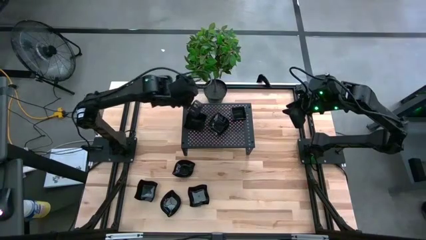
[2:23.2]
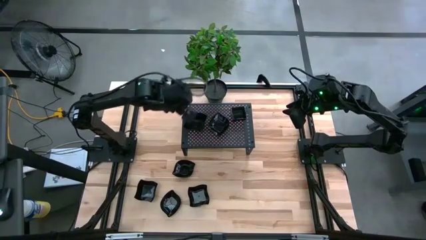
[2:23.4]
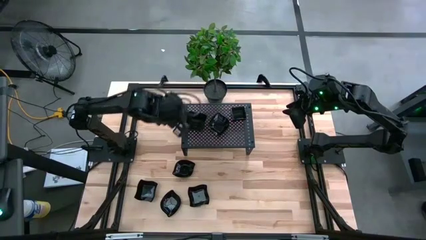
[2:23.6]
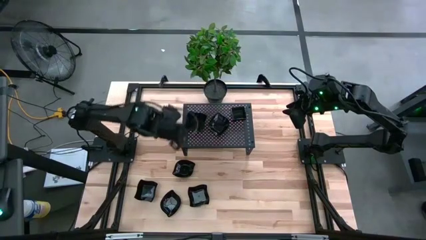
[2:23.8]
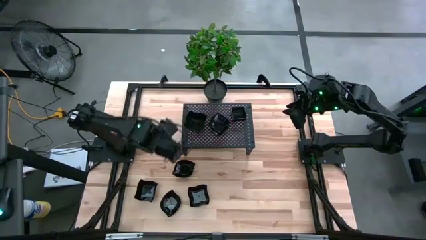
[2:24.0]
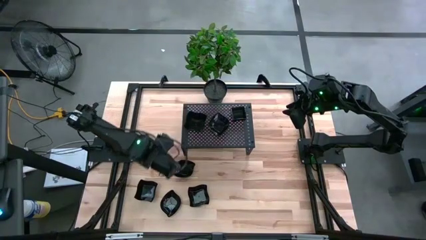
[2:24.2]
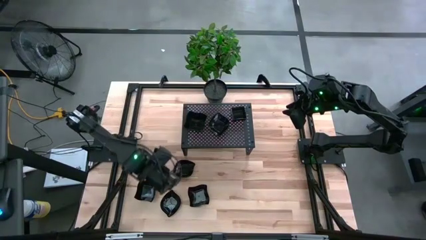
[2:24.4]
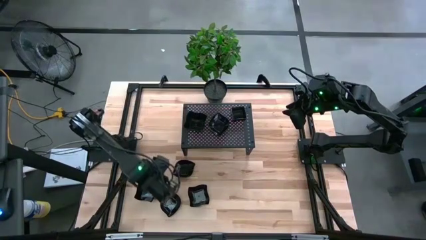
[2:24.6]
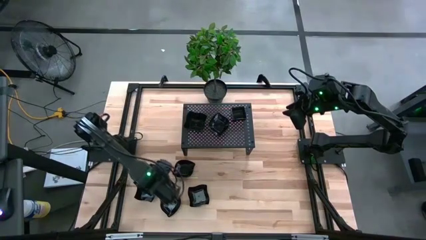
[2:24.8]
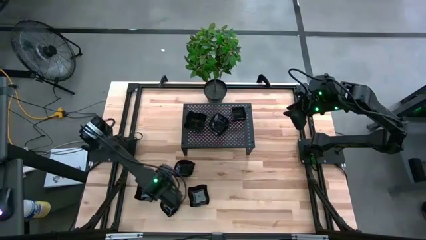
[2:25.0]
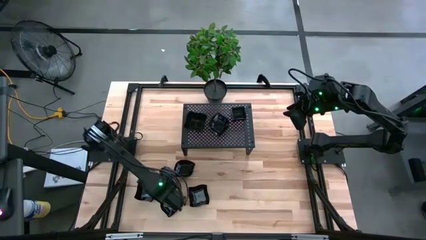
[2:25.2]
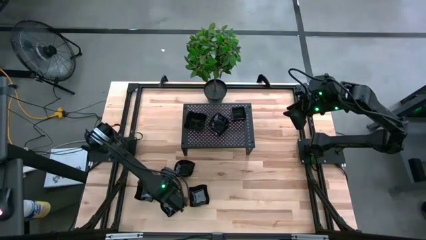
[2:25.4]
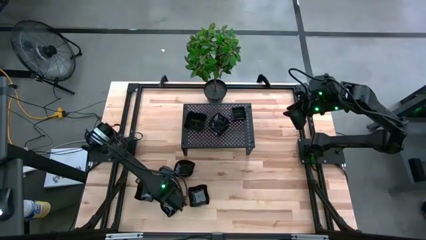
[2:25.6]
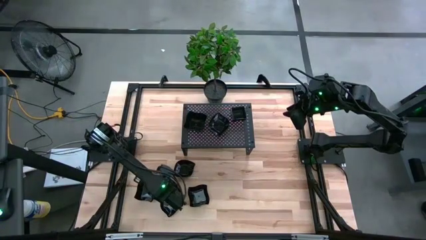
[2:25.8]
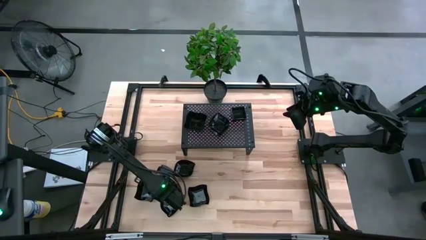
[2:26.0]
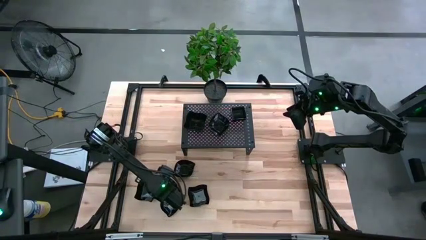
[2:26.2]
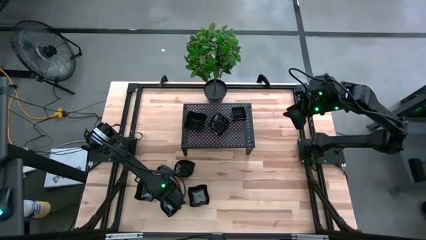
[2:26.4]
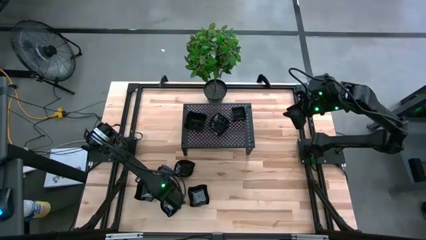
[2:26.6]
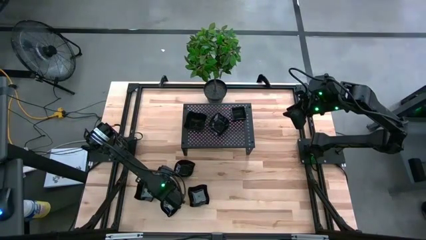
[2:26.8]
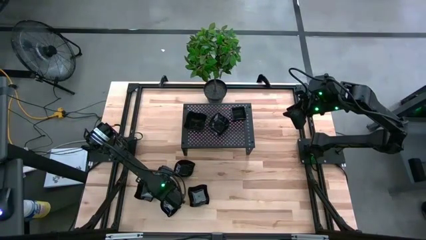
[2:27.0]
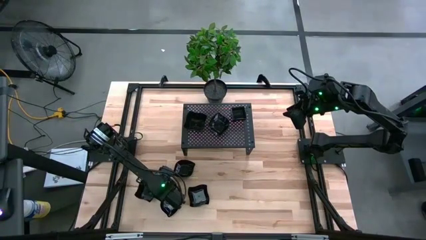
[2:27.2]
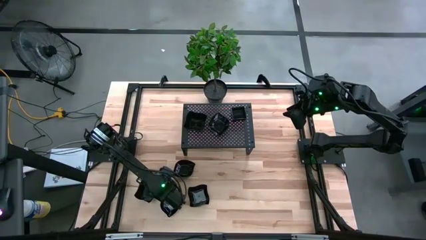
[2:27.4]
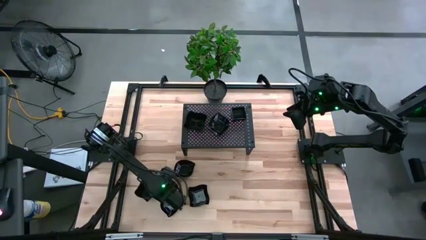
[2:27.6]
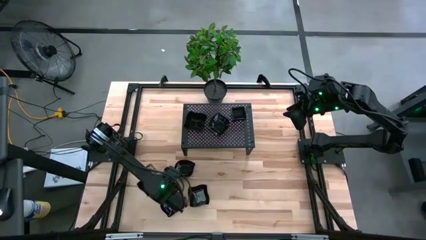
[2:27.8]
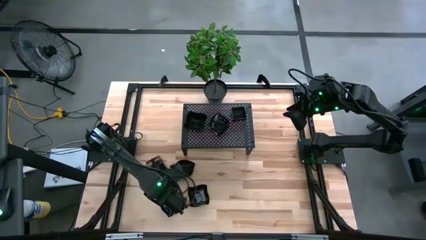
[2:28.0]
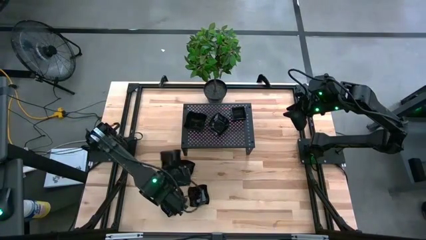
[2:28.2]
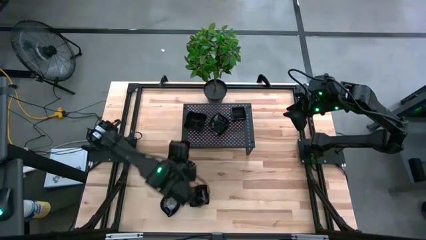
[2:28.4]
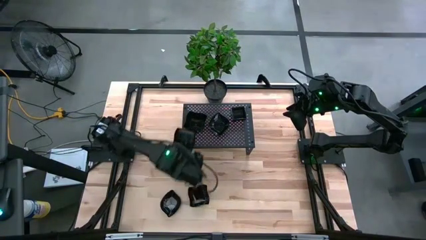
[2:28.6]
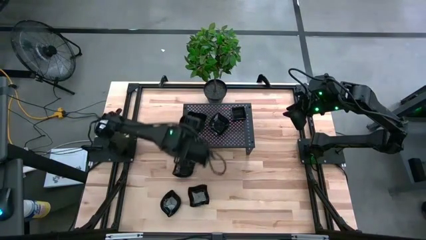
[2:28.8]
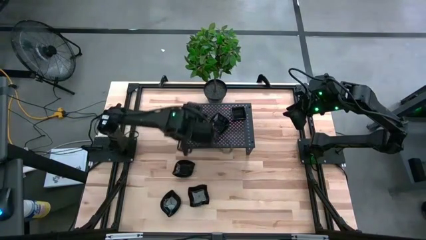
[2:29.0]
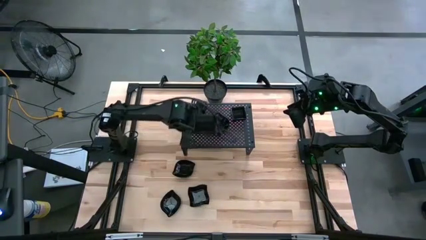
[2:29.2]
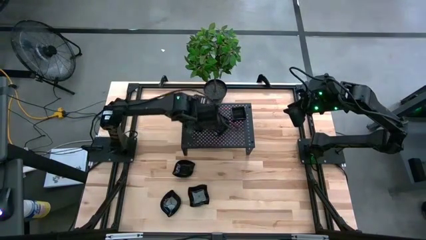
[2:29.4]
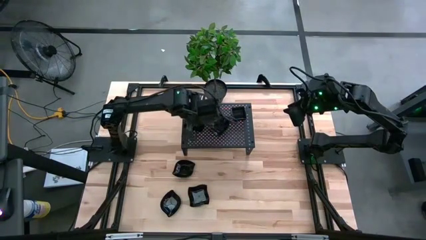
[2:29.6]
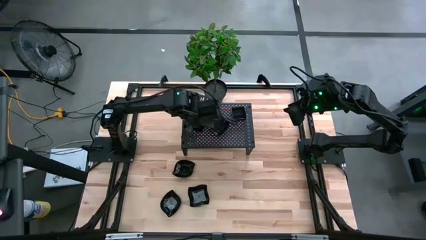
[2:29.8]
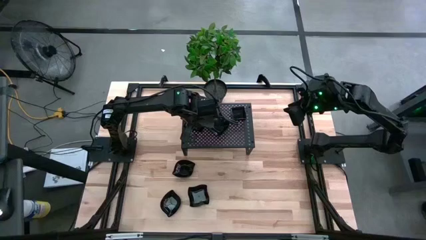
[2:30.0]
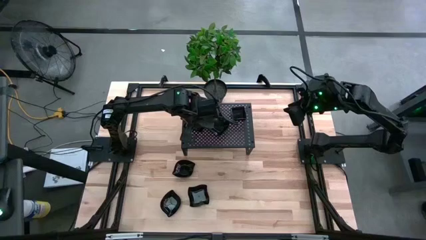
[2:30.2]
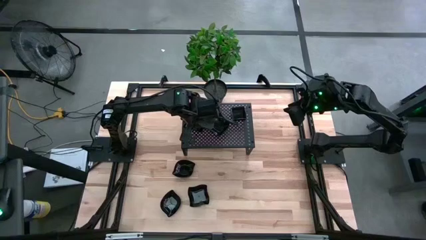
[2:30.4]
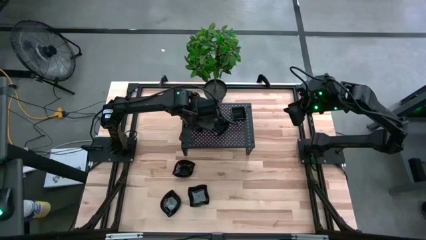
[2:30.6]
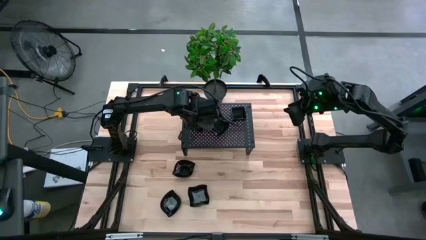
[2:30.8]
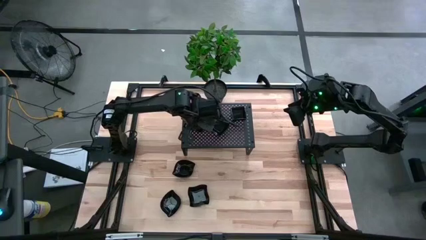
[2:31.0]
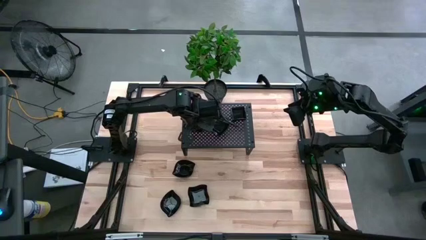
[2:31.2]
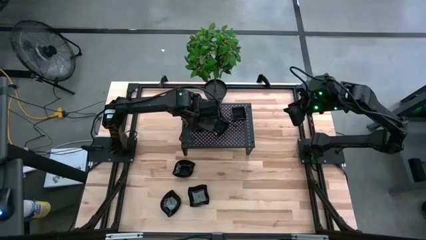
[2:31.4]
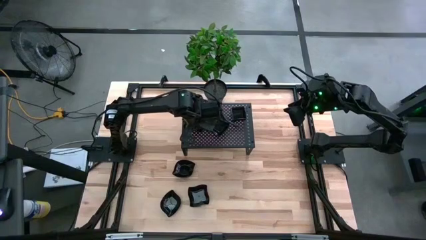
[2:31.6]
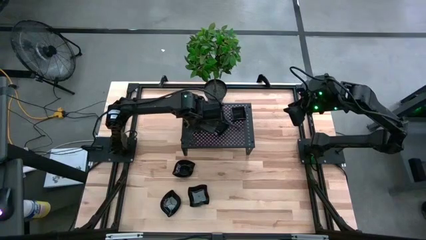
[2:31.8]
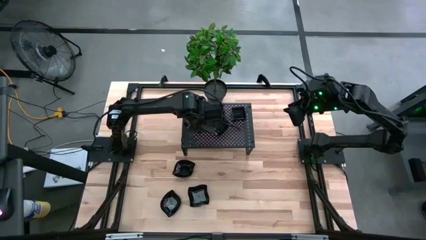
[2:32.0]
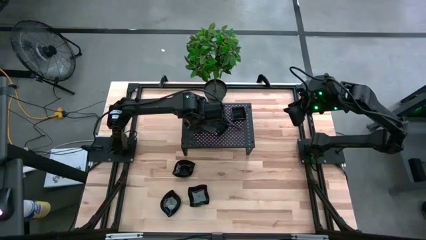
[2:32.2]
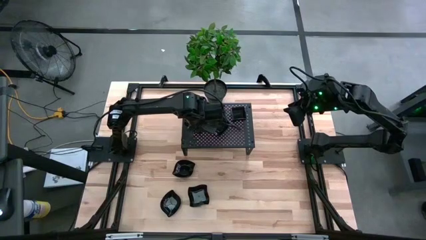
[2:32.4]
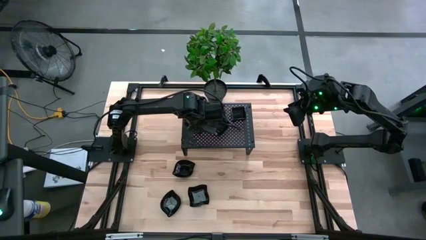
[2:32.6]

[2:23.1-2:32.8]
Task: Pick & Place Mini shaped plates
Stack the black distorted square plate on top of the other black distorted square plates on the shelf

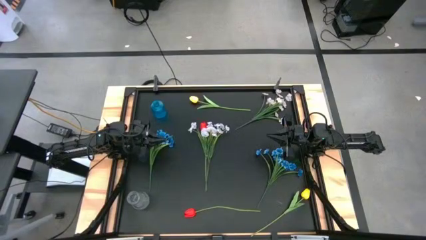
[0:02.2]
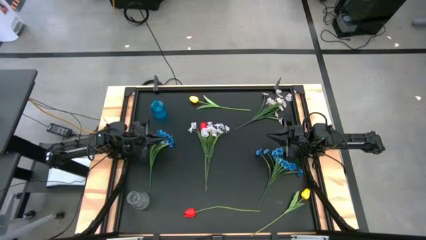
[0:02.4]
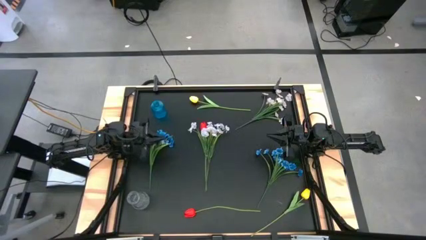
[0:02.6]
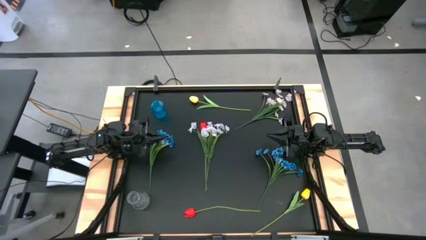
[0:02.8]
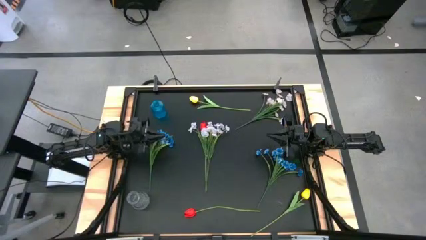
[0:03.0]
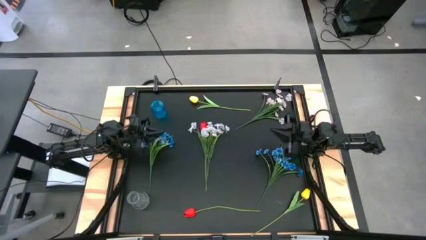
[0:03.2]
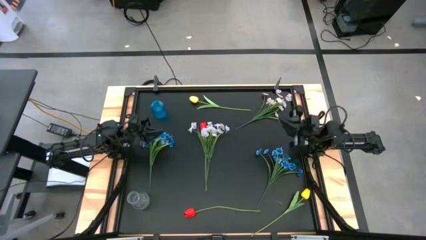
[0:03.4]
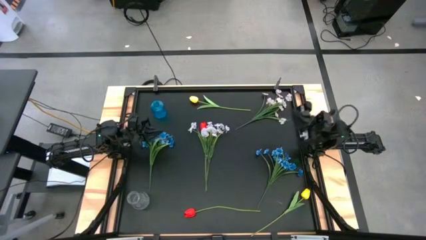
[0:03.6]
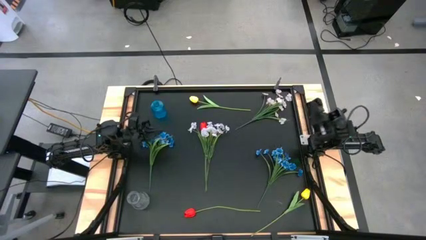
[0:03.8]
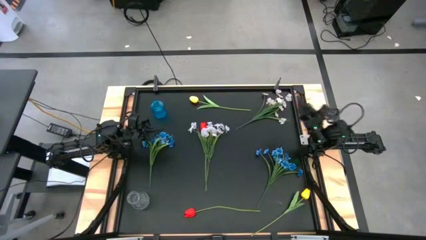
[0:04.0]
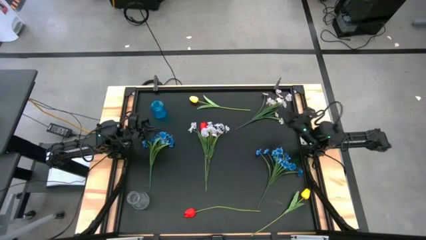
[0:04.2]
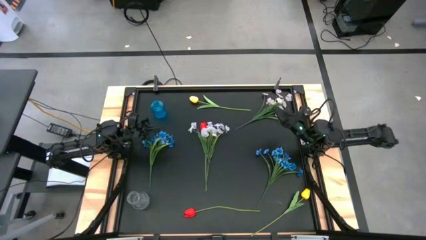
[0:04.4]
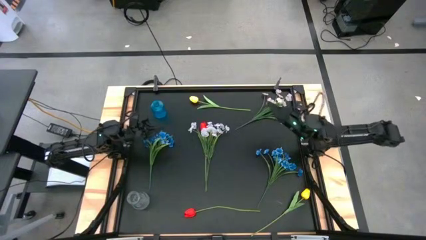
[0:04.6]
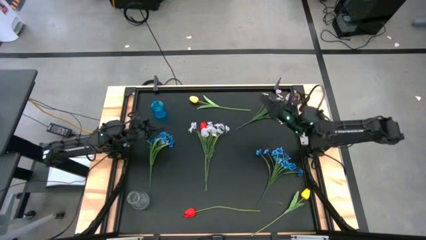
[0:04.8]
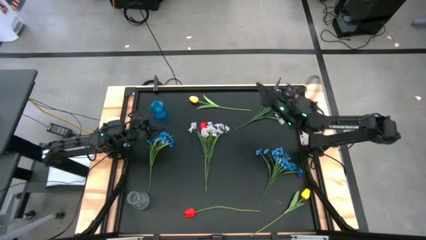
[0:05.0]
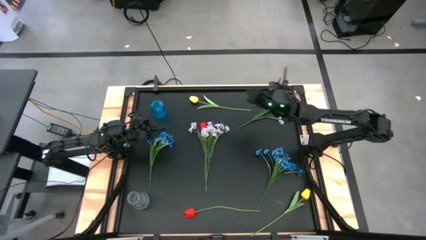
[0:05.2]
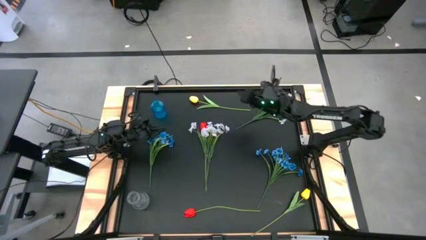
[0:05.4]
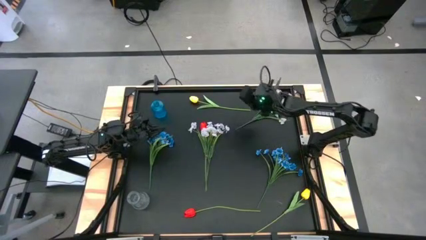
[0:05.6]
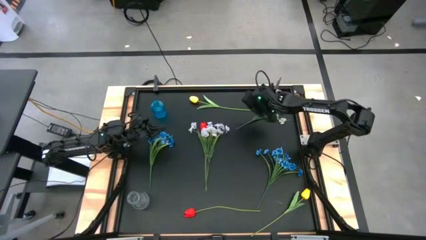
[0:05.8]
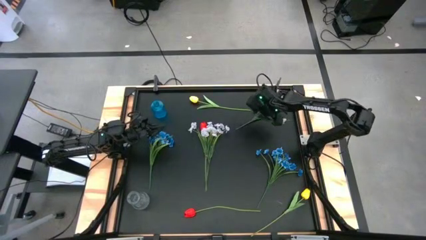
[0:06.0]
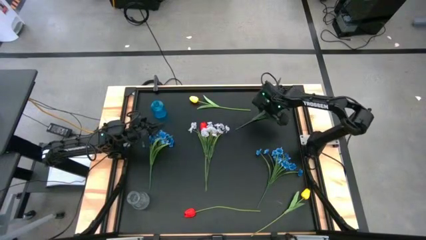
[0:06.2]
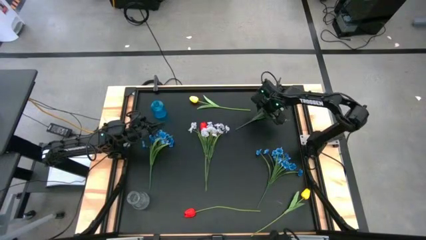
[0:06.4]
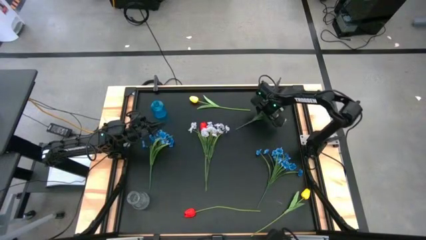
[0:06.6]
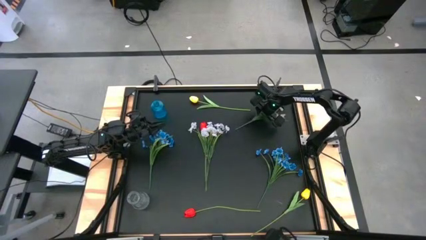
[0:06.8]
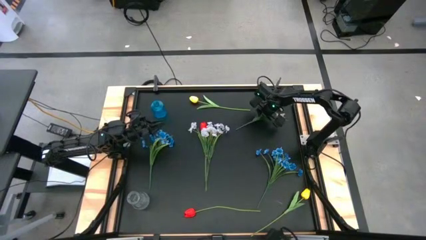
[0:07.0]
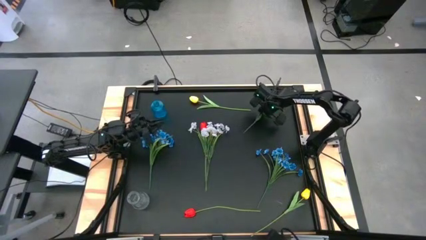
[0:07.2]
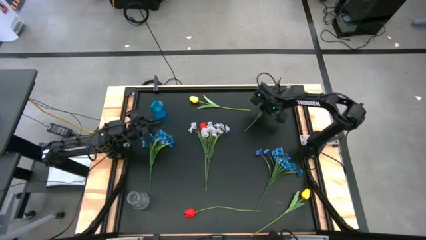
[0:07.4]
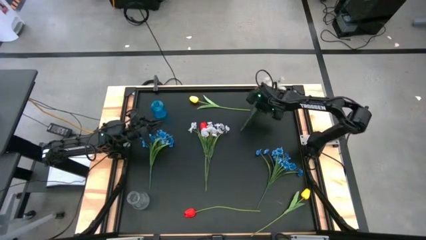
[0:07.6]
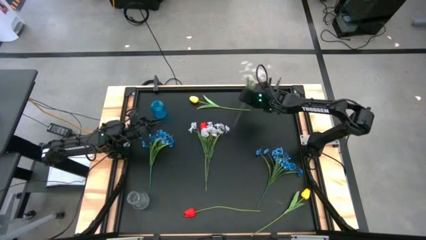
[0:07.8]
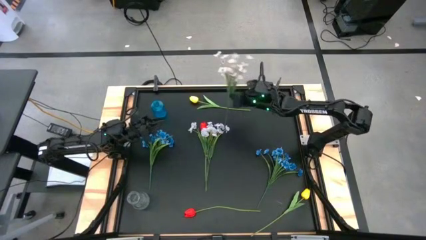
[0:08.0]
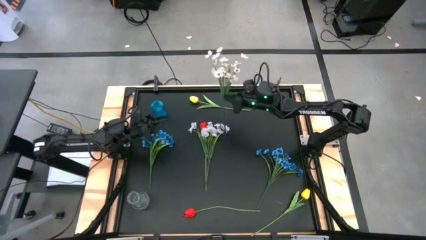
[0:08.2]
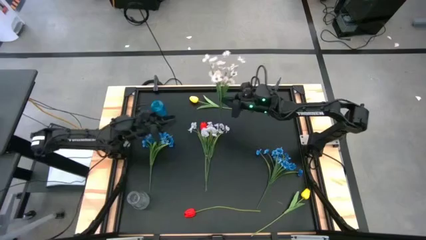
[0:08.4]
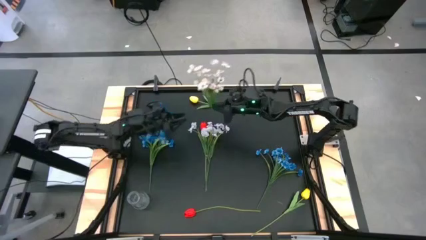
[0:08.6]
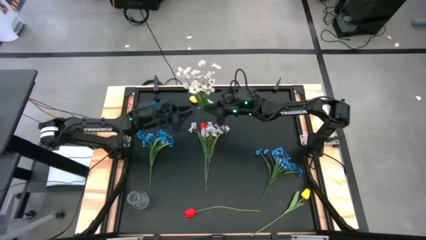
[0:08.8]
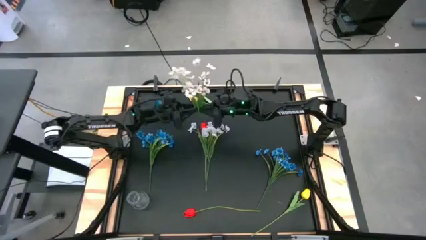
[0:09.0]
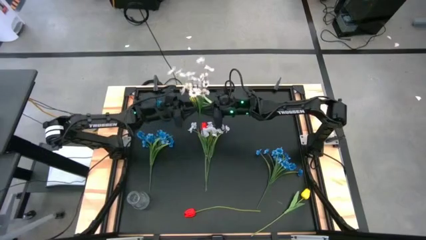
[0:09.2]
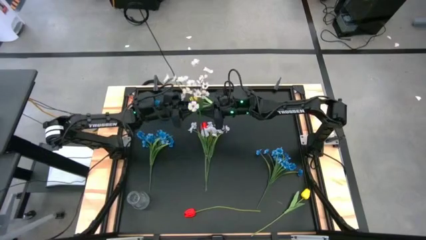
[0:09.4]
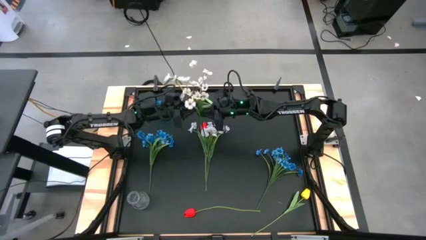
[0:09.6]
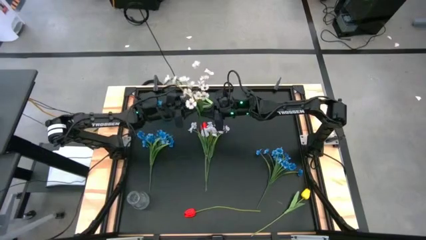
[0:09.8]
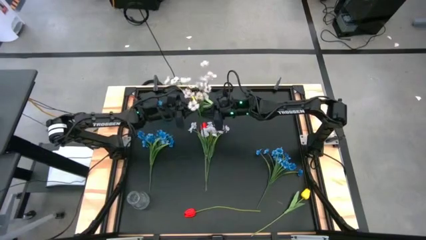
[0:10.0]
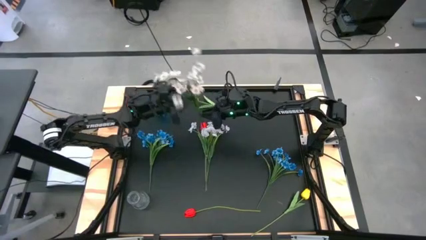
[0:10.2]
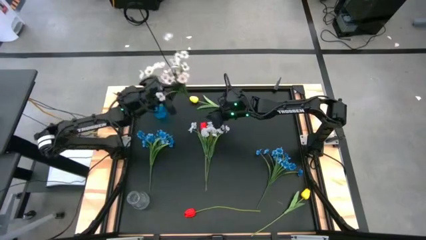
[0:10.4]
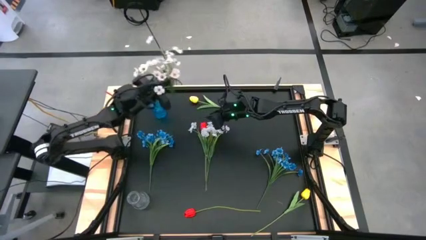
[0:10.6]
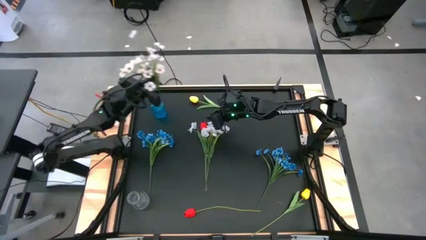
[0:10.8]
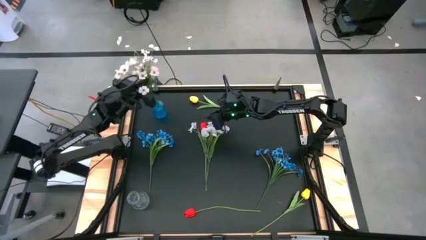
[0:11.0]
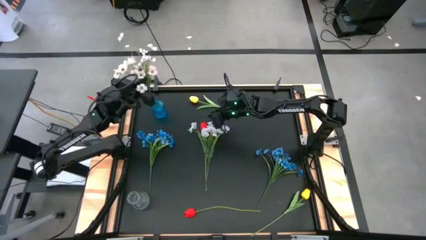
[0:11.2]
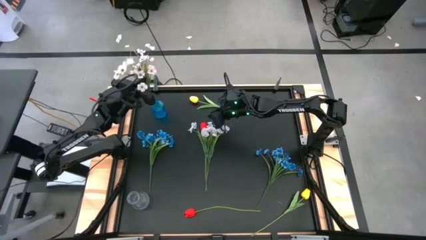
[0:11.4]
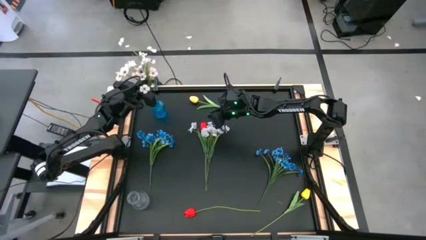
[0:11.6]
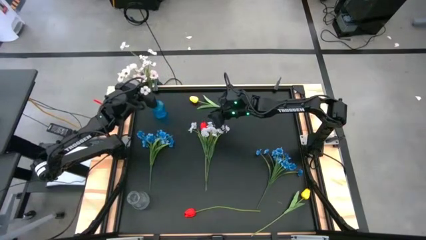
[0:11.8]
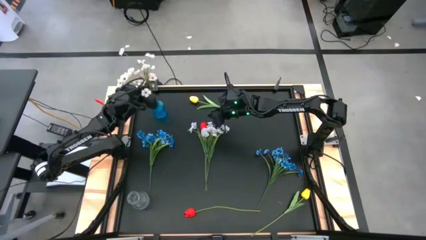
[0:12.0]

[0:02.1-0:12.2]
Task: Sort flowers into vase by color
Put the right white flowers into the blue vase
